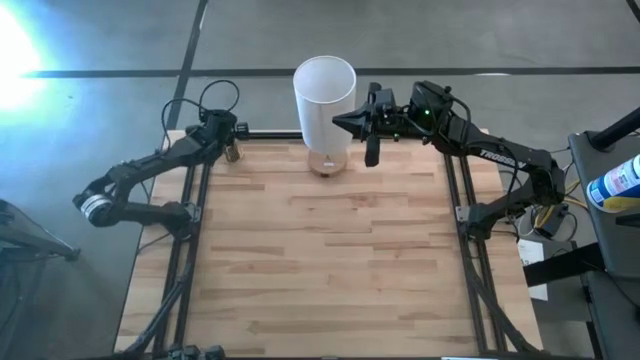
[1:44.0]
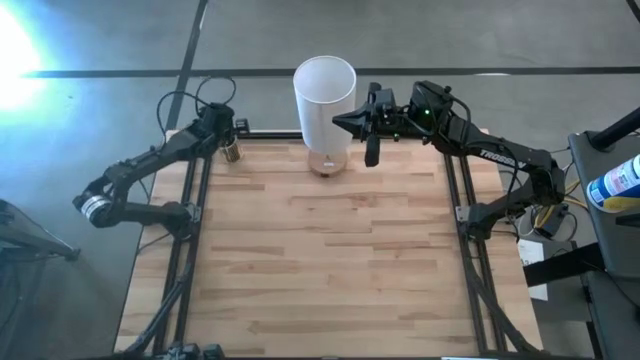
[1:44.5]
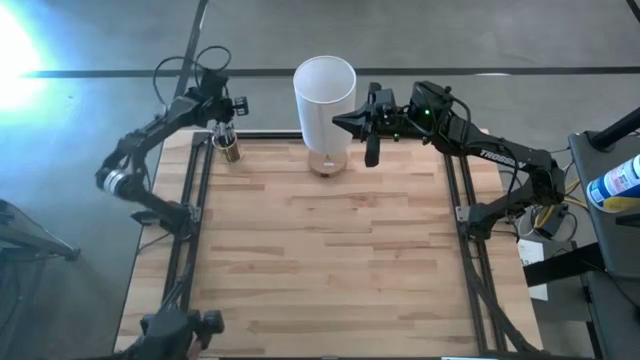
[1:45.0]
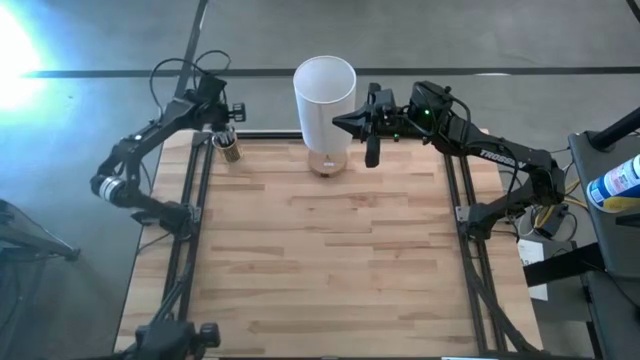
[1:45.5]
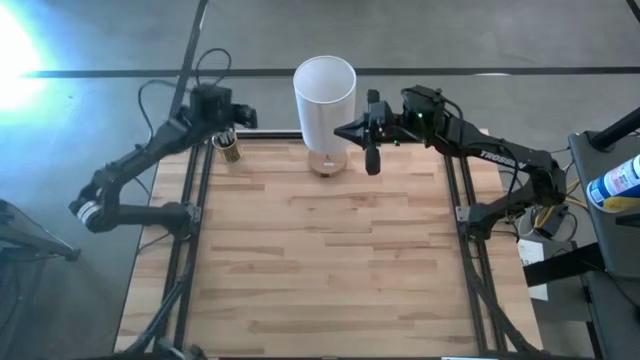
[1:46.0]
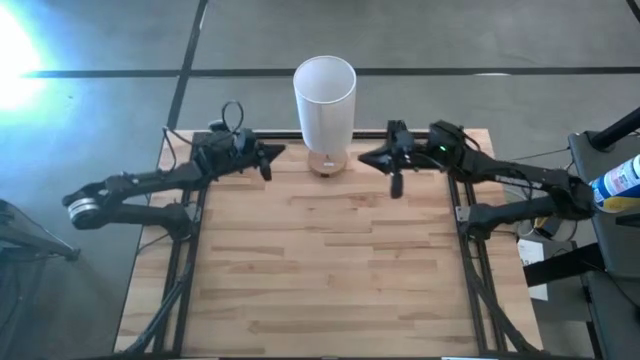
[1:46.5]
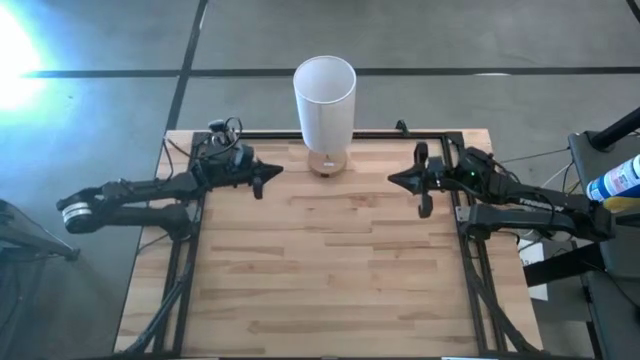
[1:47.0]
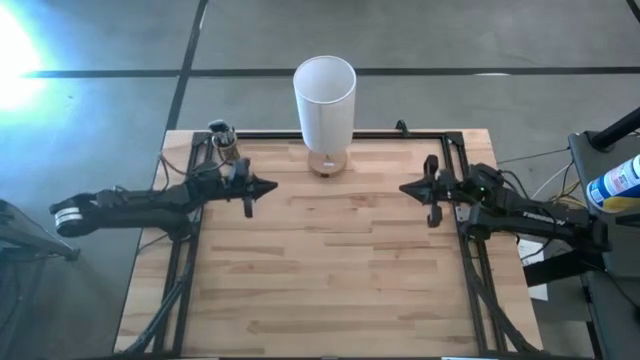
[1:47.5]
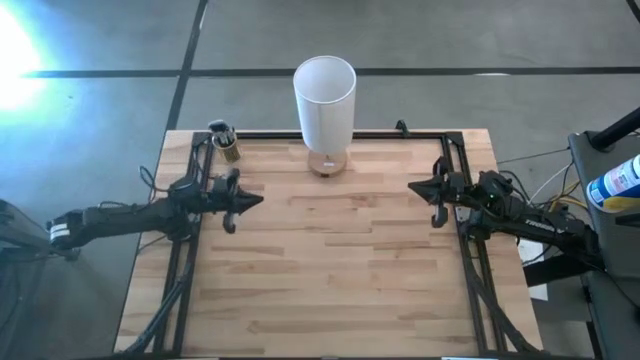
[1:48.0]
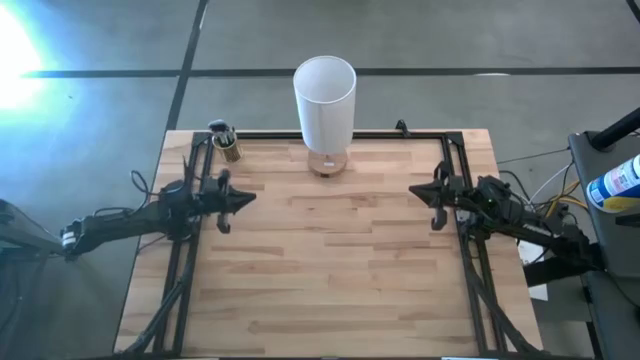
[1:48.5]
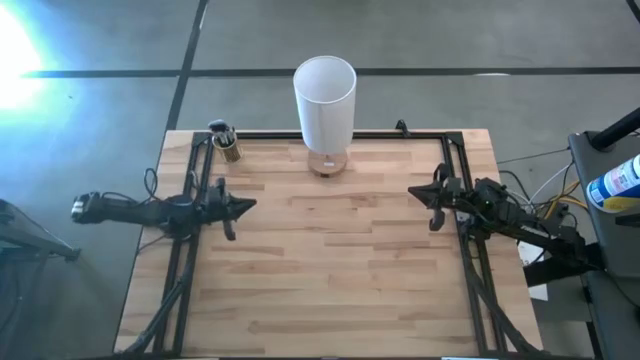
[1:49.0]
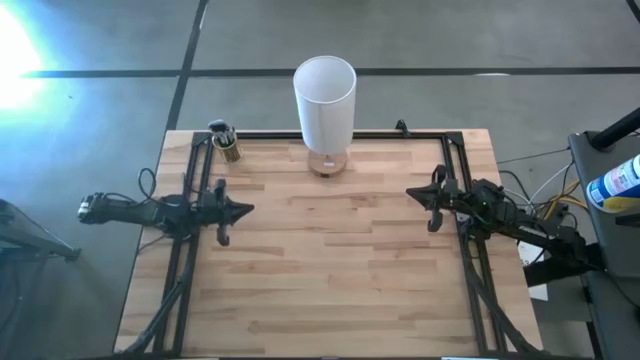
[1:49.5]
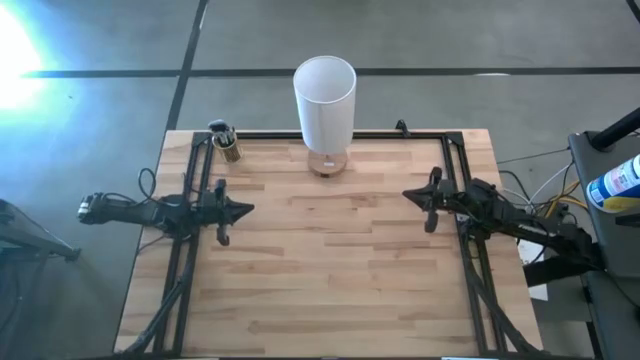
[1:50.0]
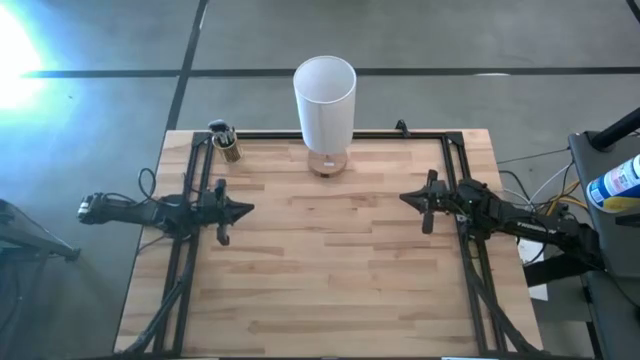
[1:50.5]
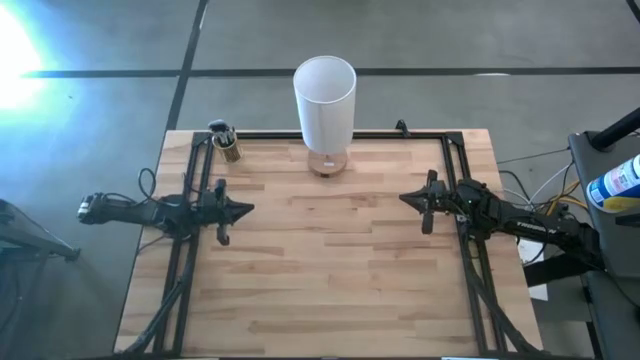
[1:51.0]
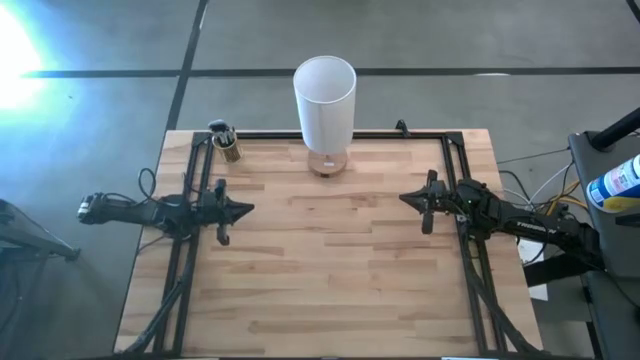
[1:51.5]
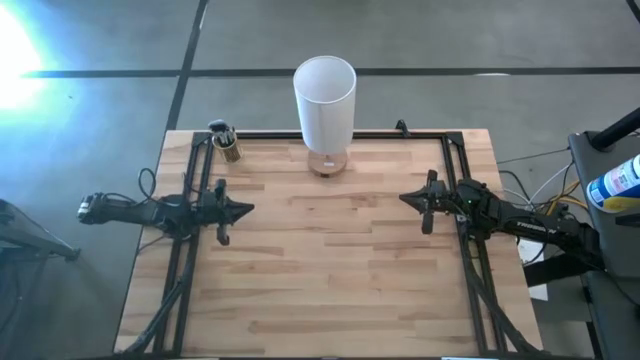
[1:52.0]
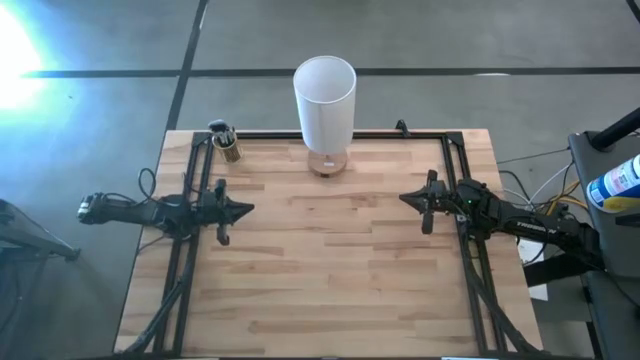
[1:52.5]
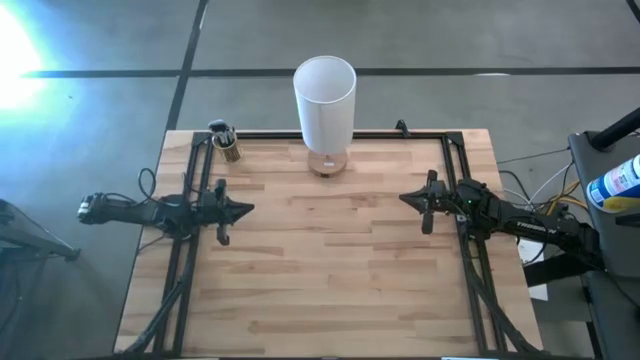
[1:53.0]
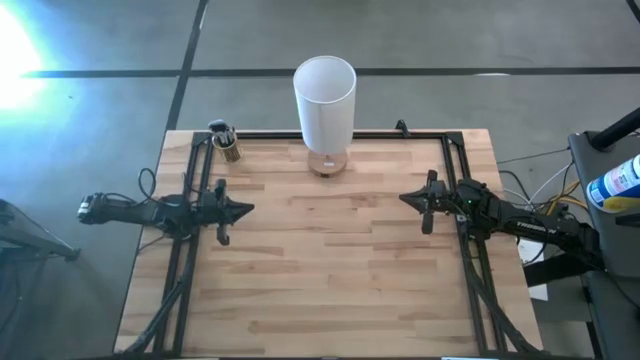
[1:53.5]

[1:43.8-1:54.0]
Task: Pick & Place Makeup Brushes
Return to Home Position

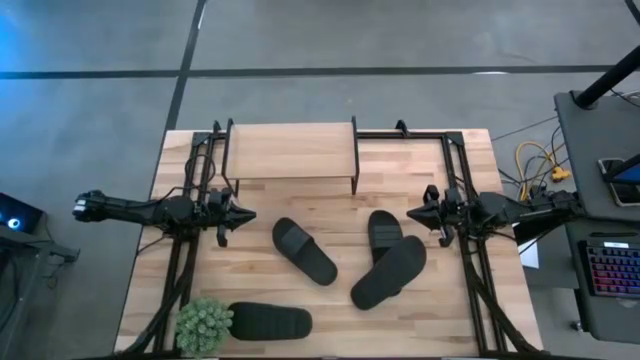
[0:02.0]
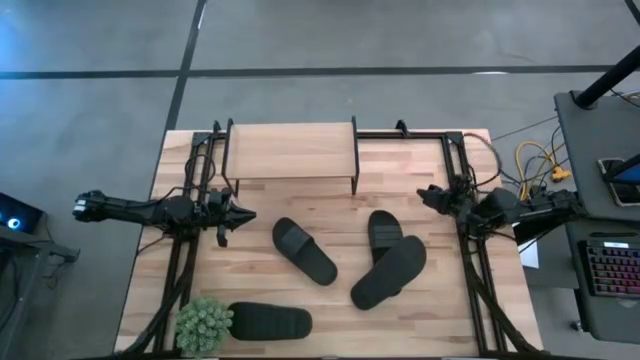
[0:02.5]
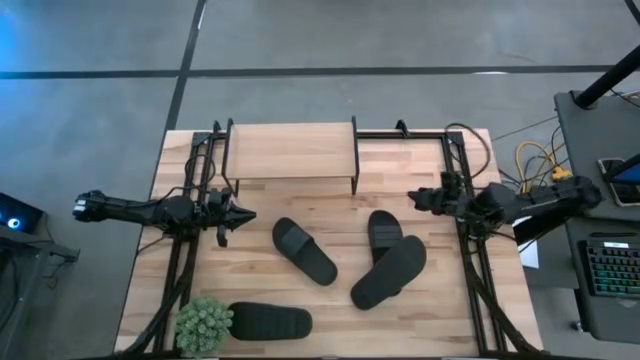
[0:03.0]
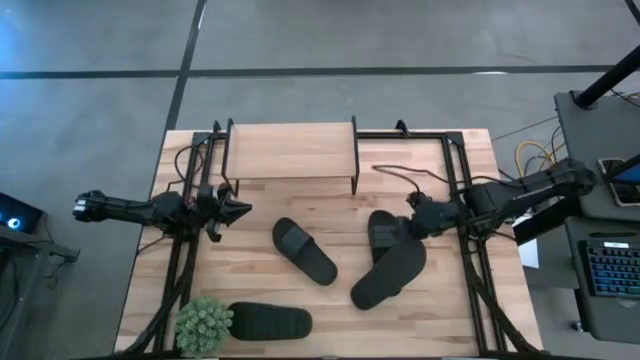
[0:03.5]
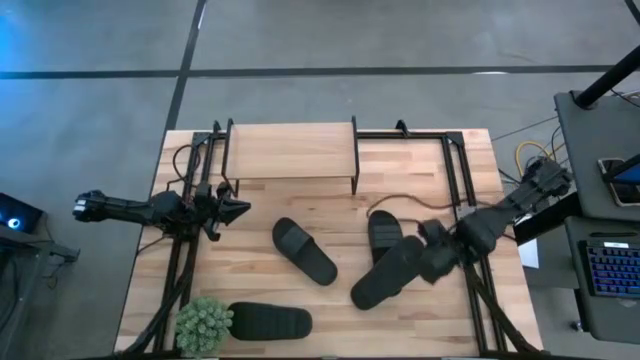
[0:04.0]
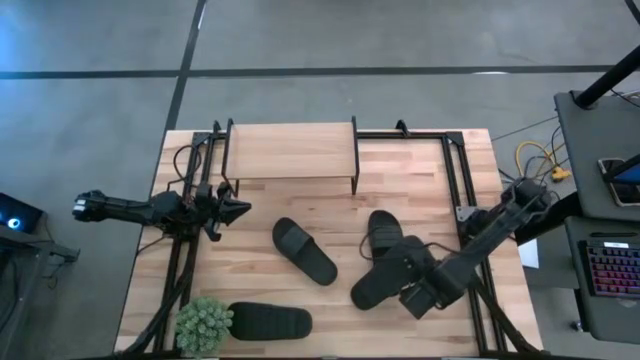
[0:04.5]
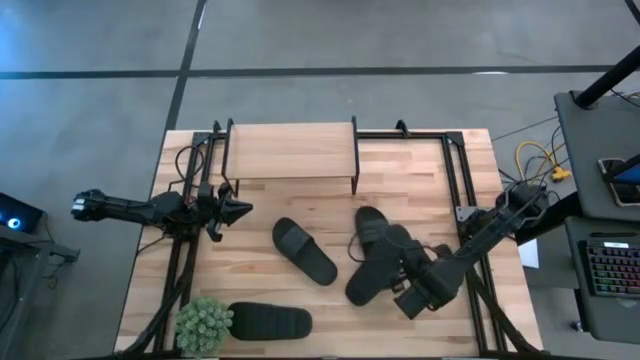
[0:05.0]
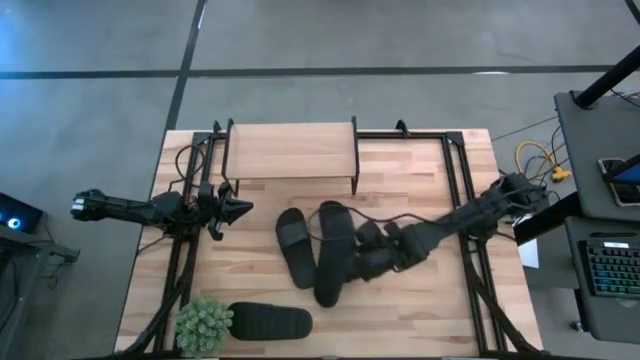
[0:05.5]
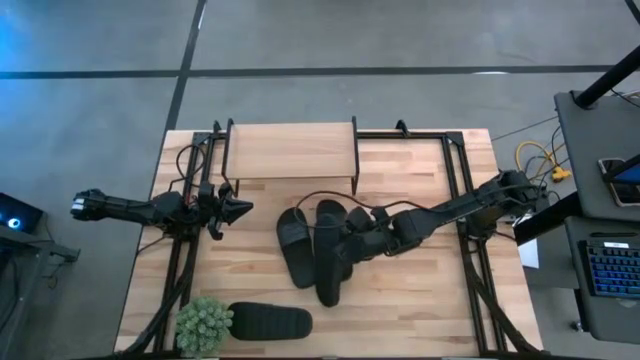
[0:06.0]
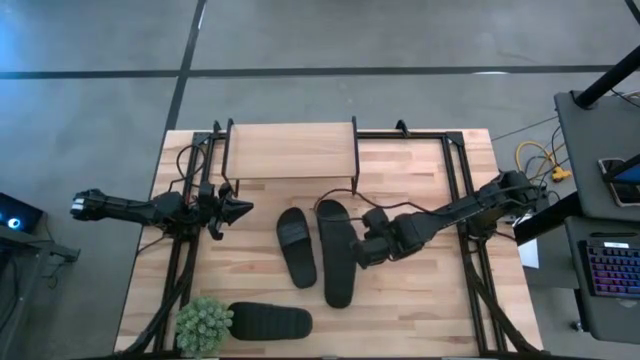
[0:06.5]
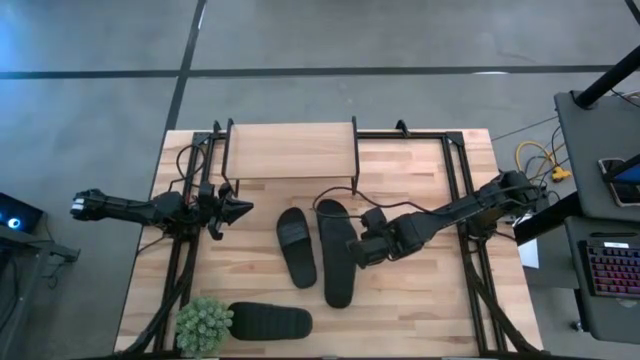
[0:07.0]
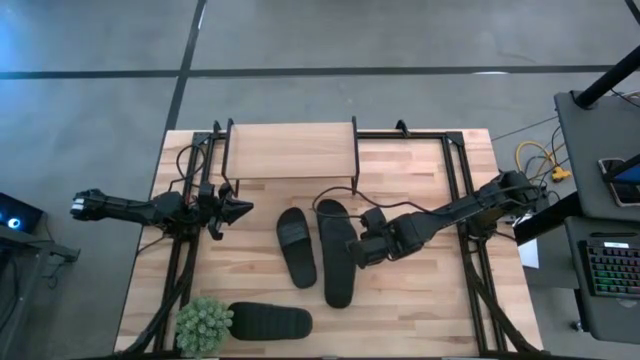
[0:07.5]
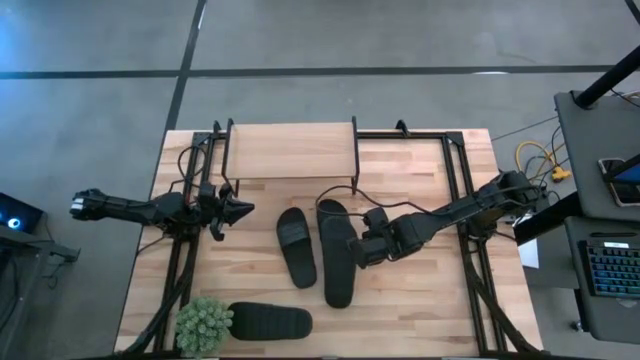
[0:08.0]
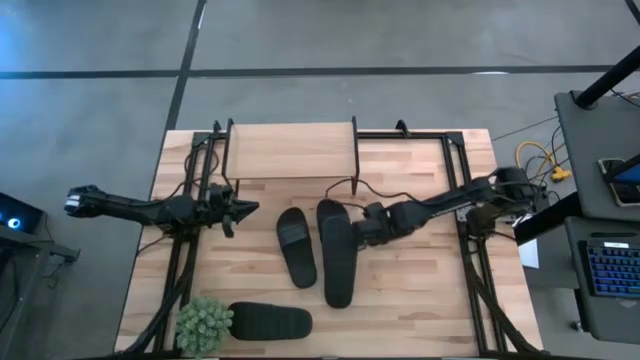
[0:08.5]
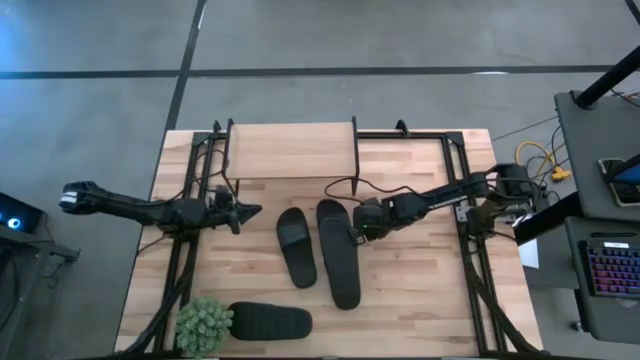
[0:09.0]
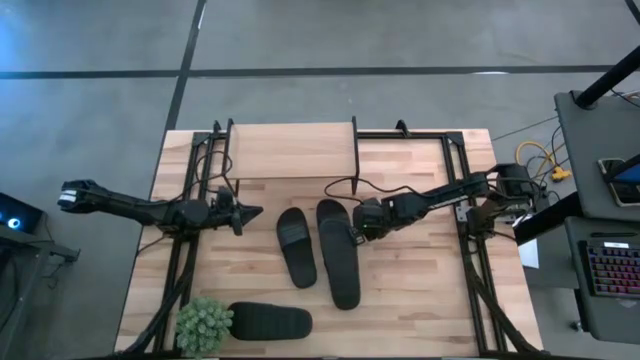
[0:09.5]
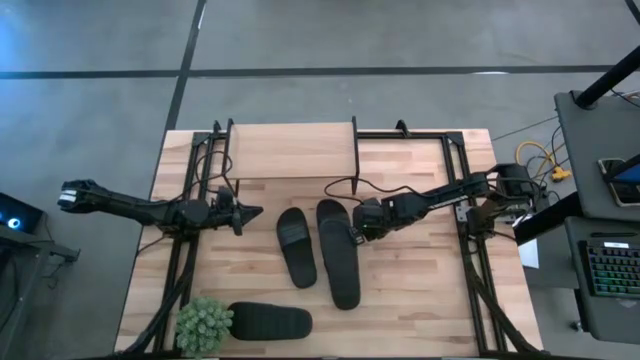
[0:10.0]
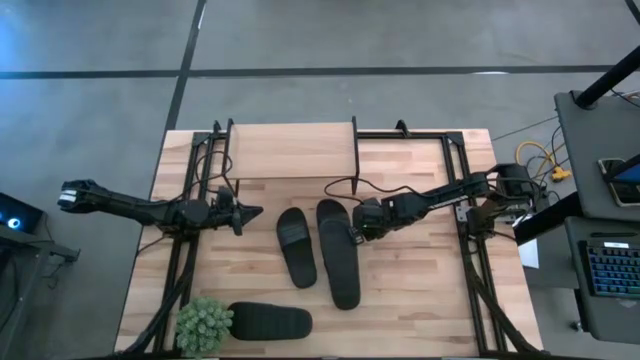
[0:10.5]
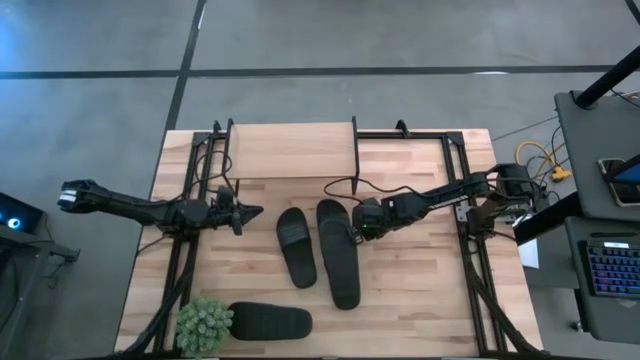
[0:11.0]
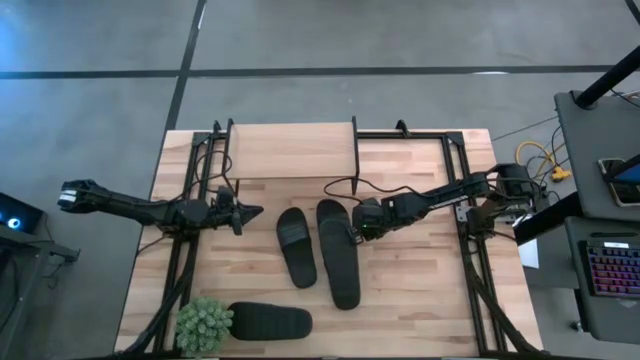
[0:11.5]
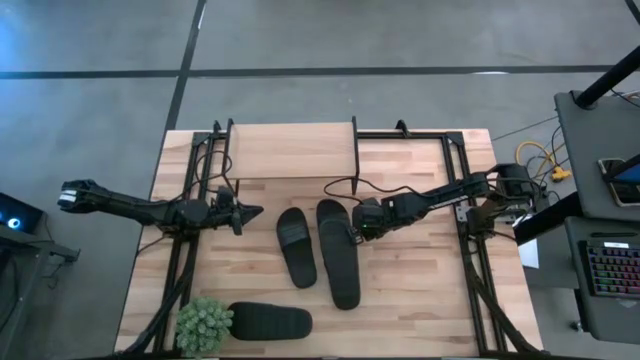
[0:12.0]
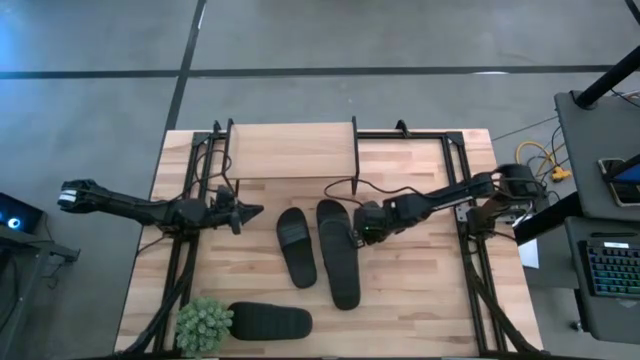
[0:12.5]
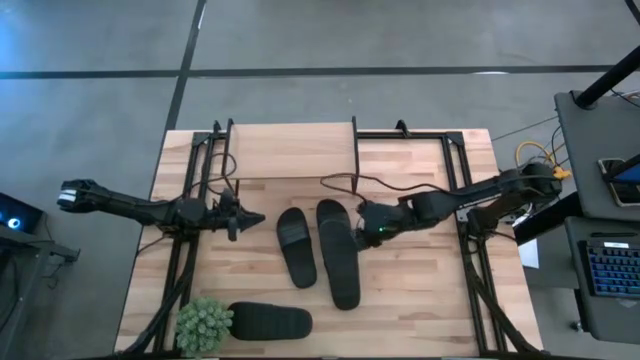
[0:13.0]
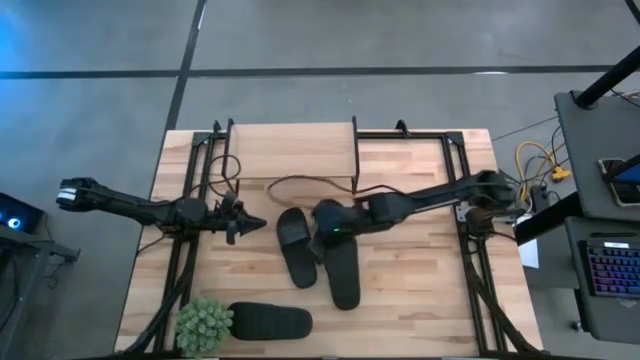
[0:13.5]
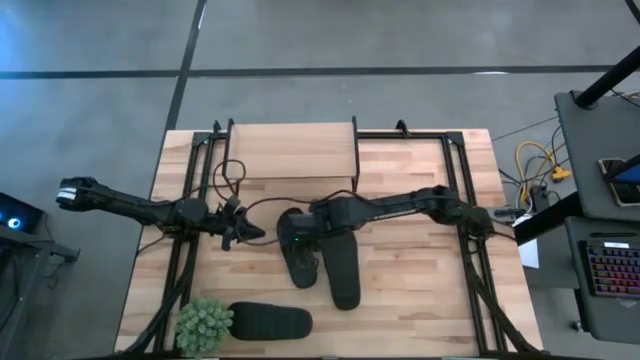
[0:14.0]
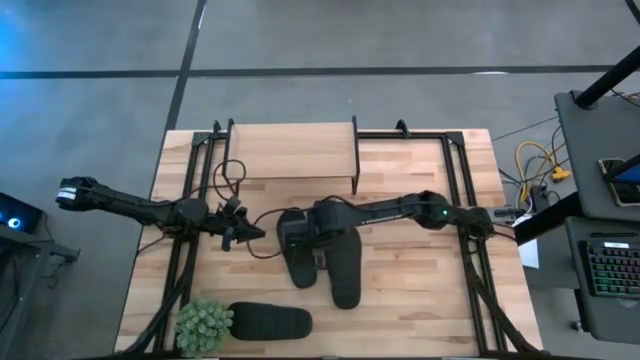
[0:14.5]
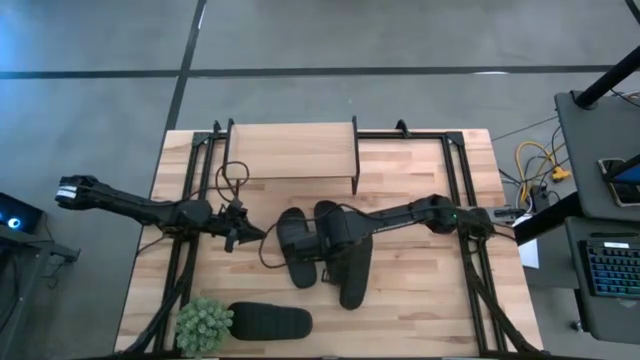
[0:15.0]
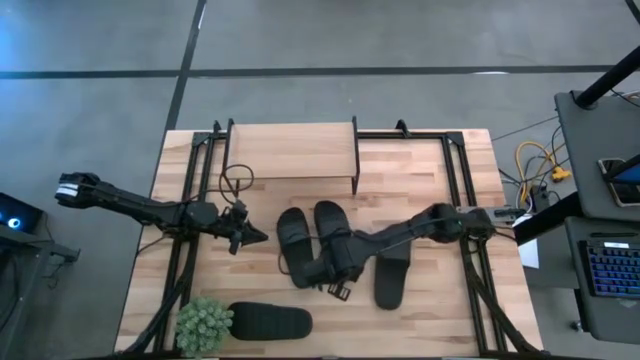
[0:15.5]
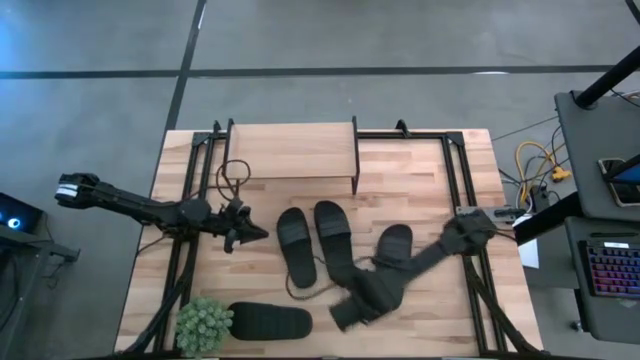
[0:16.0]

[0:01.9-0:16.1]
Task: Pick and place slides into the shelf
Put the black slide on the shelf
